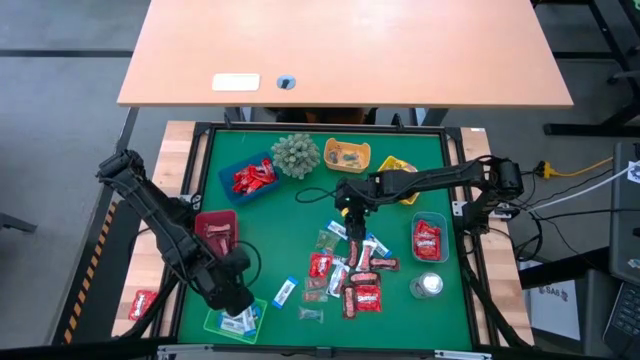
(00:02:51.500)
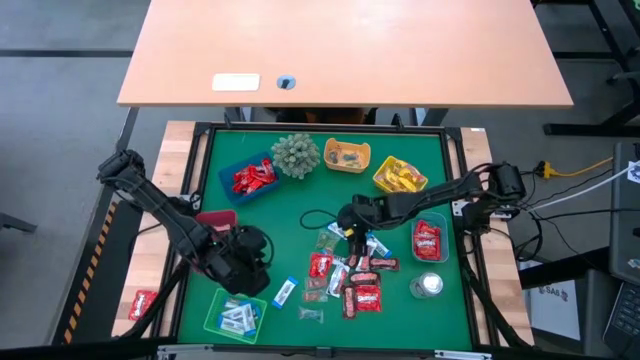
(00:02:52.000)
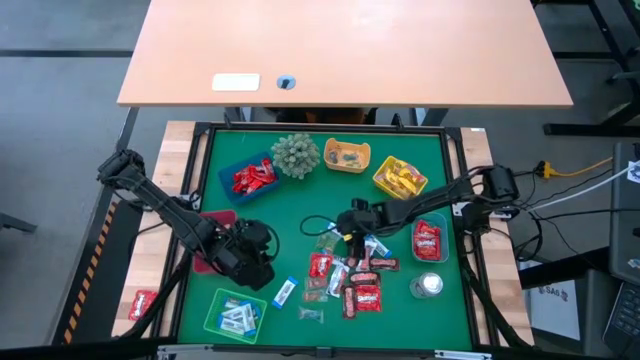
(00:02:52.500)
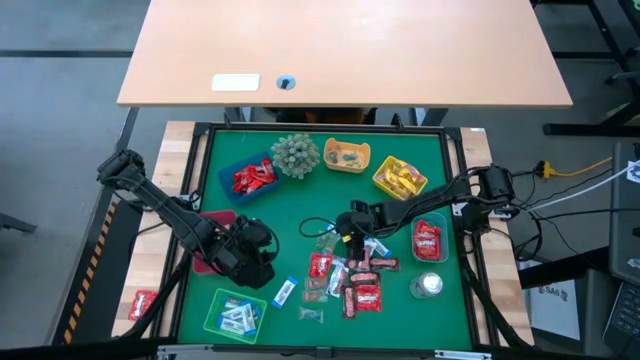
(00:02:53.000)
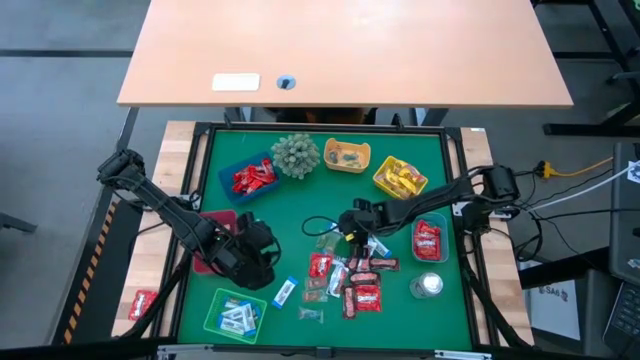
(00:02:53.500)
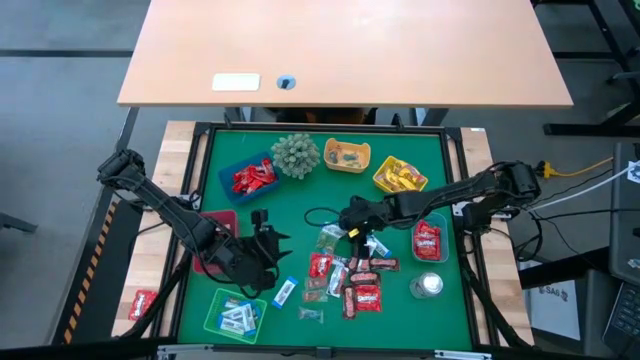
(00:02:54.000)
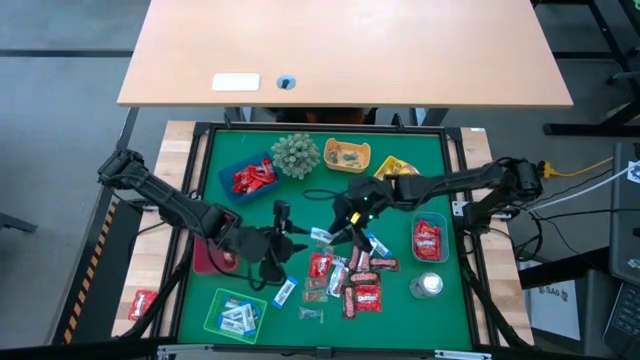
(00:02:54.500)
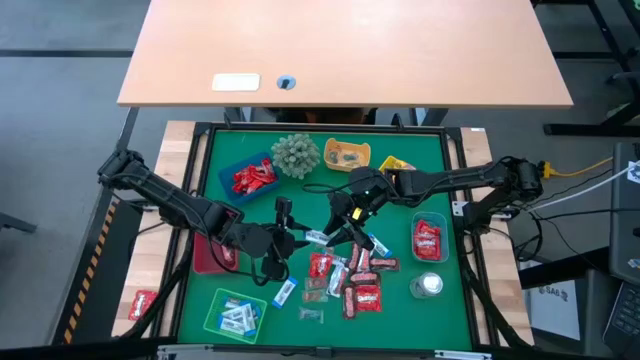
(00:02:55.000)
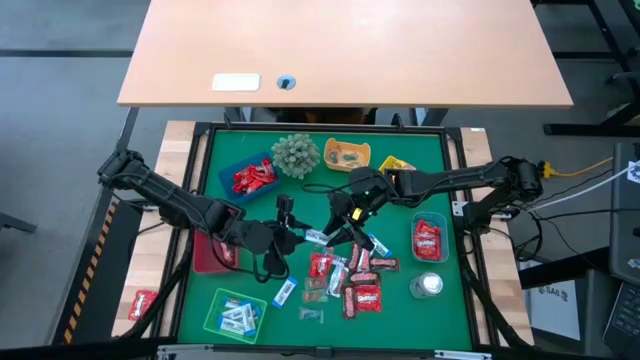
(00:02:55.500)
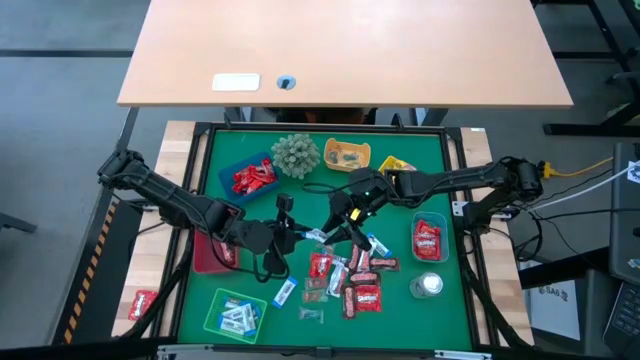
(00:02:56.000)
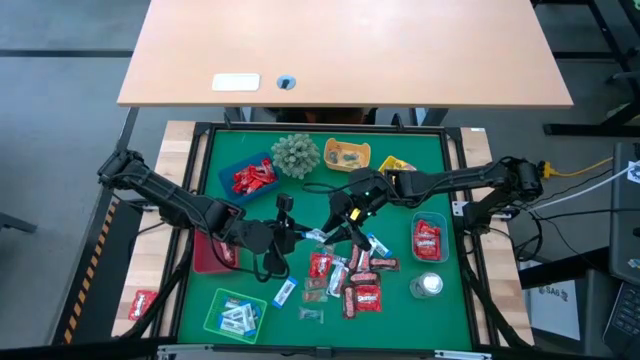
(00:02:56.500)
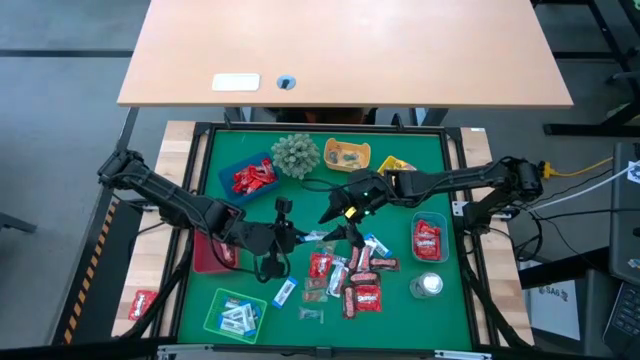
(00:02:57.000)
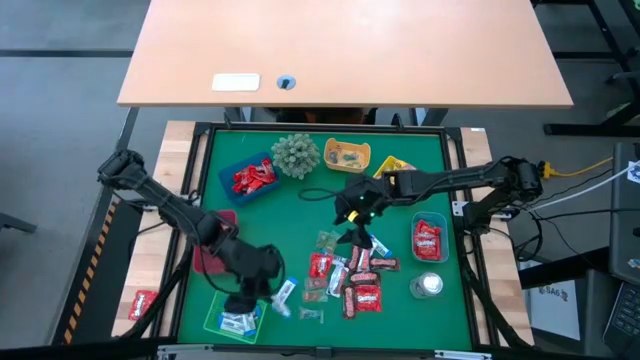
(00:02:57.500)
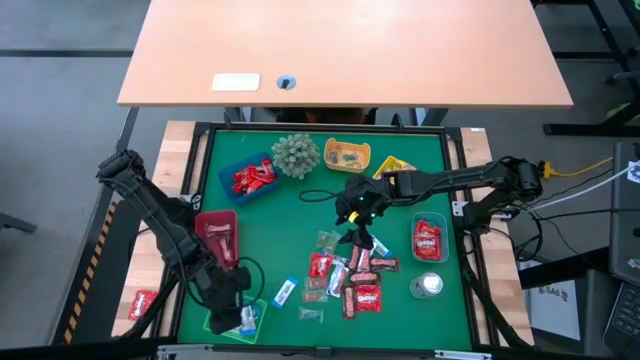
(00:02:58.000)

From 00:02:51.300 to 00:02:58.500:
Task: Sort candy
Put the white-blue chocolate into the green bin

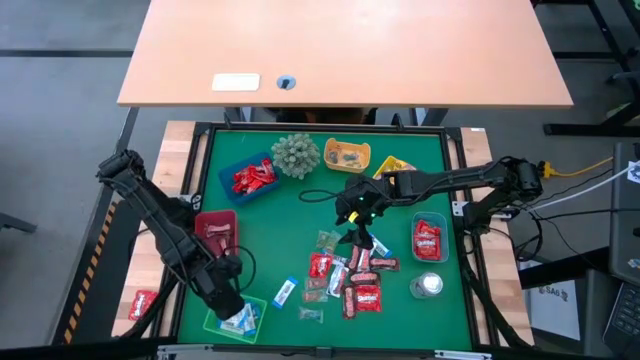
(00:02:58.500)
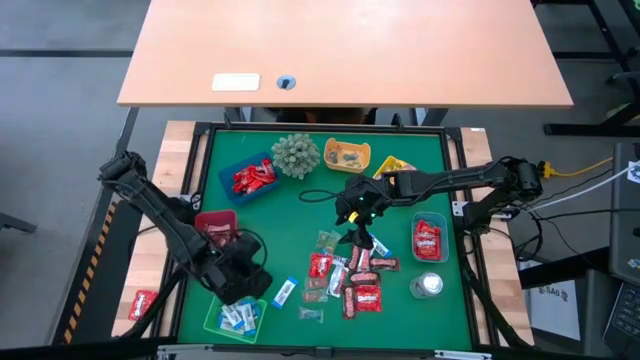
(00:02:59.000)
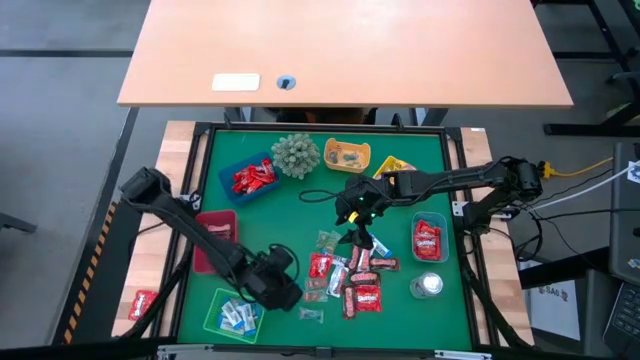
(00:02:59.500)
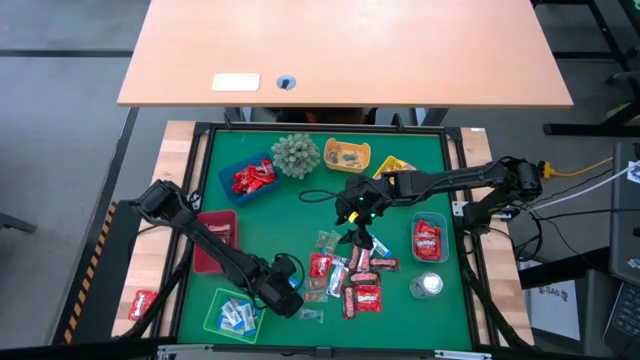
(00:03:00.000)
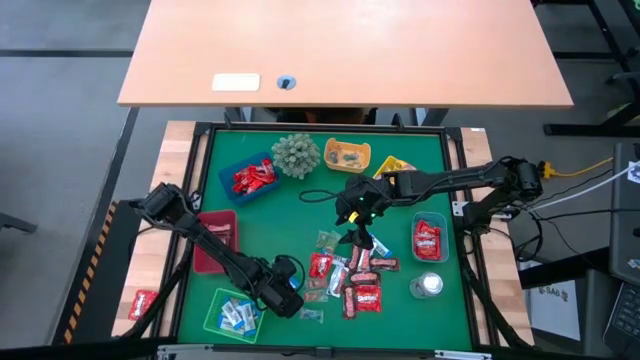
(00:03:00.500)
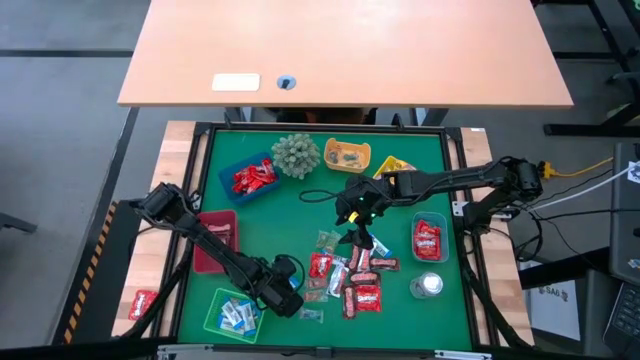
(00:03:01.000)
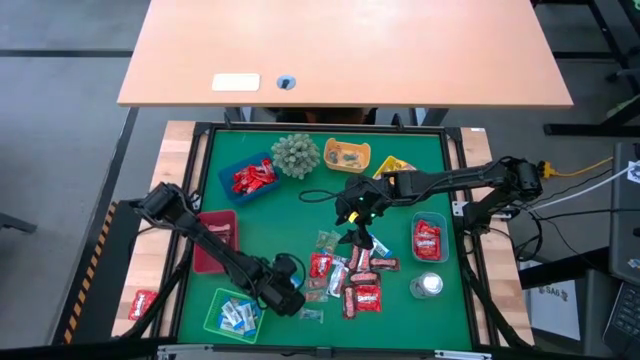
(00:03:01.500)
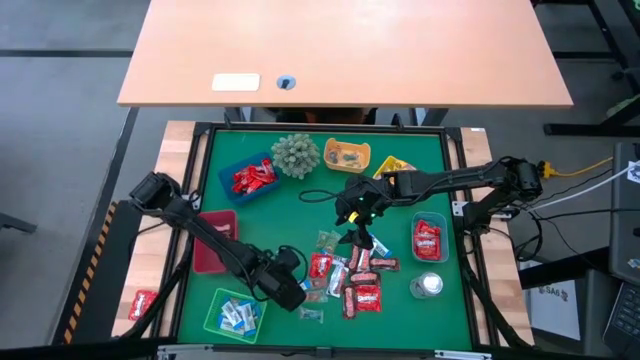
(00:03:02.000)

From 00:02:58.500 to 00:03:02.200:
Put the white-blue chocolate into the green bin

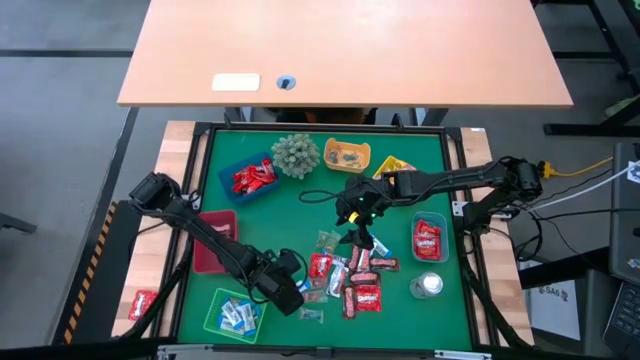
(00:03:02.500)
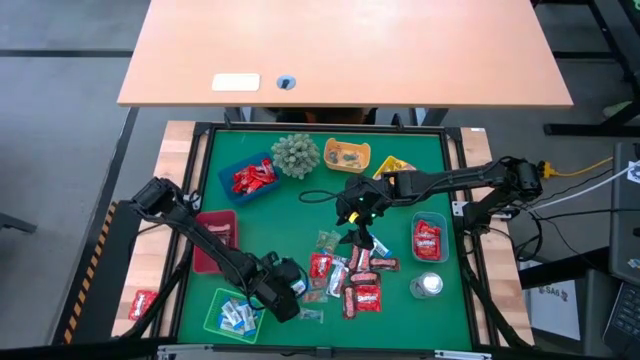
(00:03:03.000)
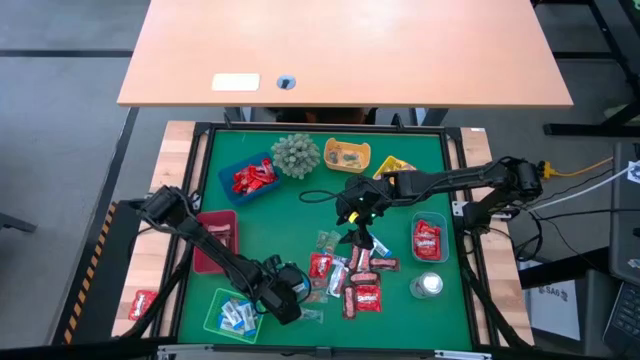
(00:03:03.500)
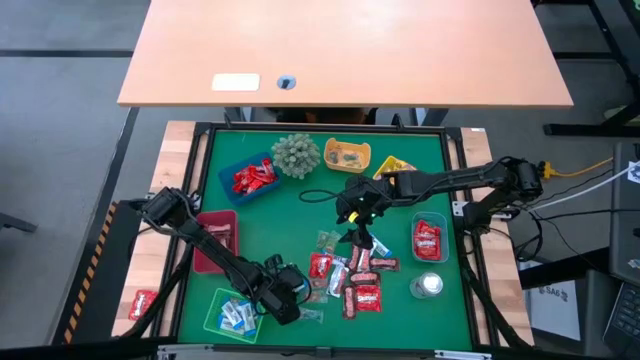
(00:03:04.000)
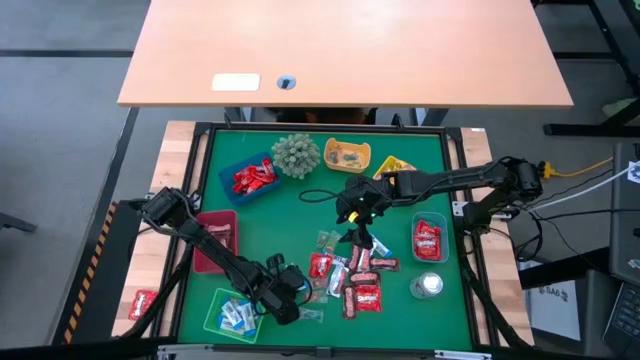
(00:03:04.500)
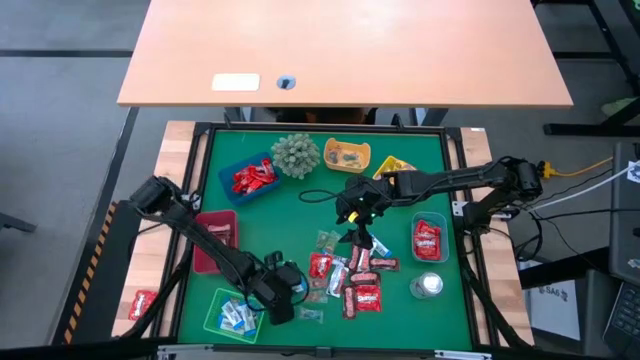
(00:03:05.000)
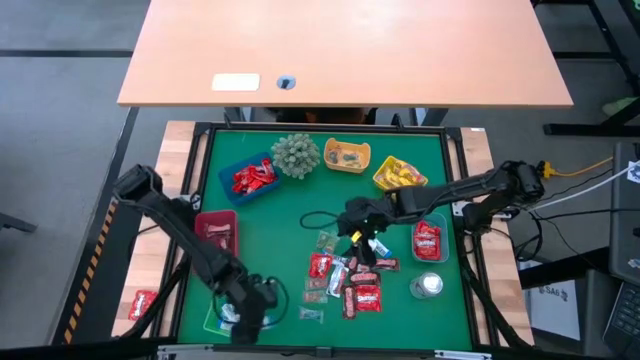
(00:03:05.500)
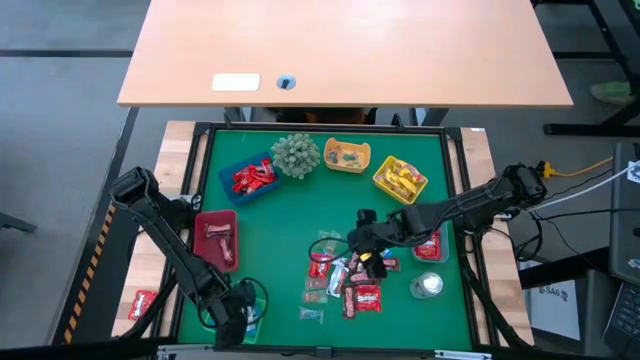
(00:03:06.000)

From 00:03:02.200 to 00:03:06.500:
Put the white-blue chocolate into the green bin

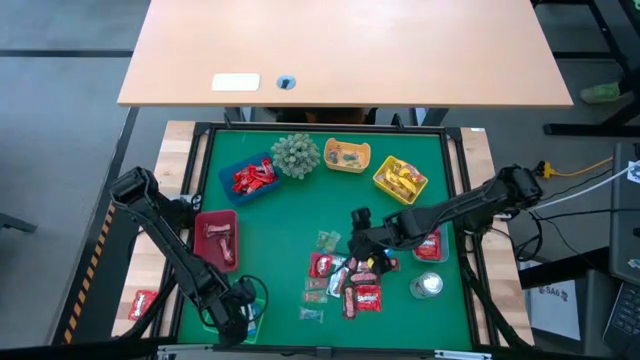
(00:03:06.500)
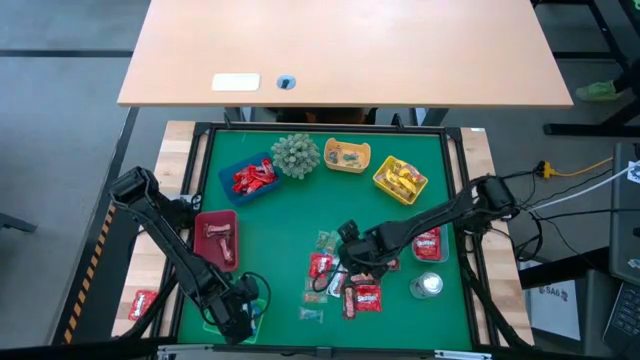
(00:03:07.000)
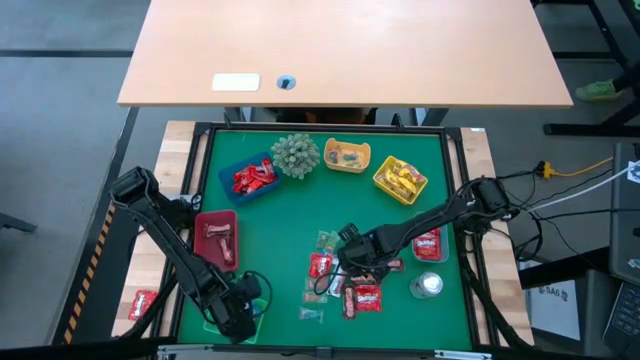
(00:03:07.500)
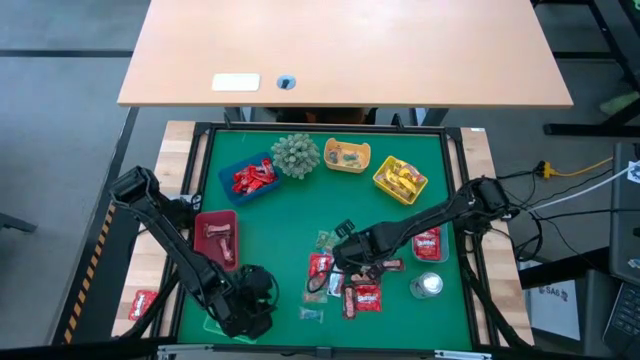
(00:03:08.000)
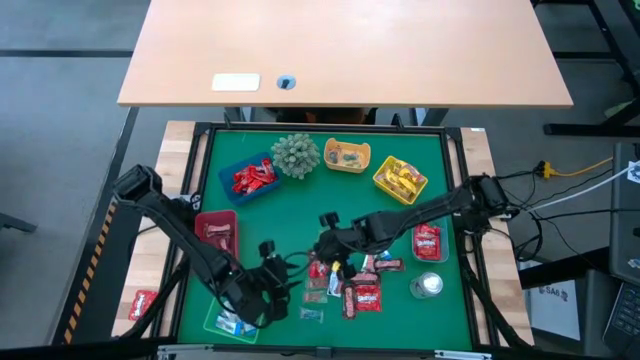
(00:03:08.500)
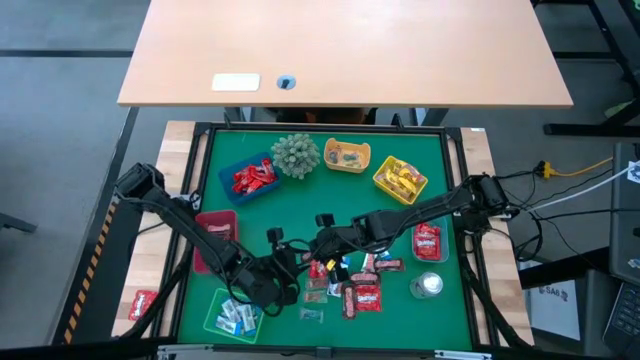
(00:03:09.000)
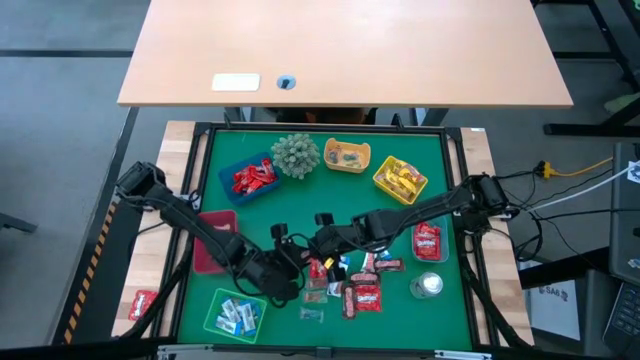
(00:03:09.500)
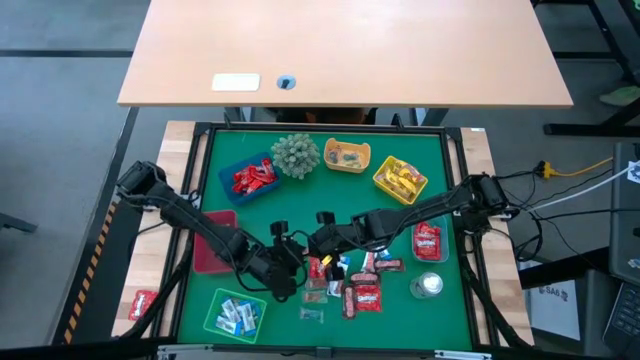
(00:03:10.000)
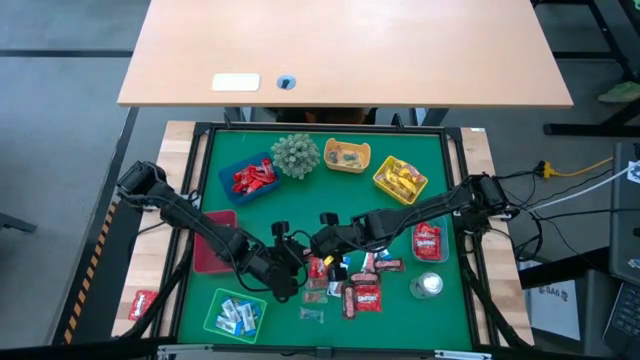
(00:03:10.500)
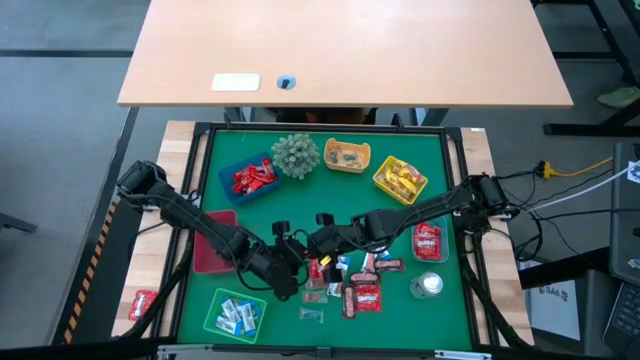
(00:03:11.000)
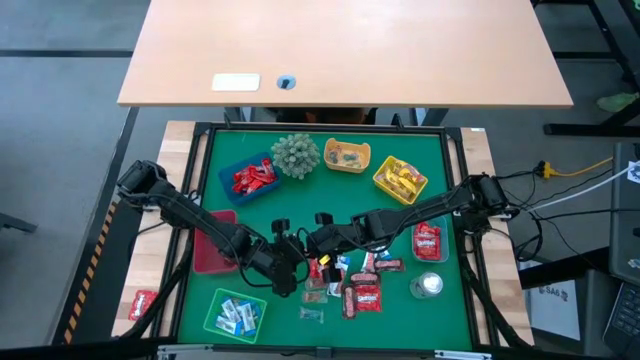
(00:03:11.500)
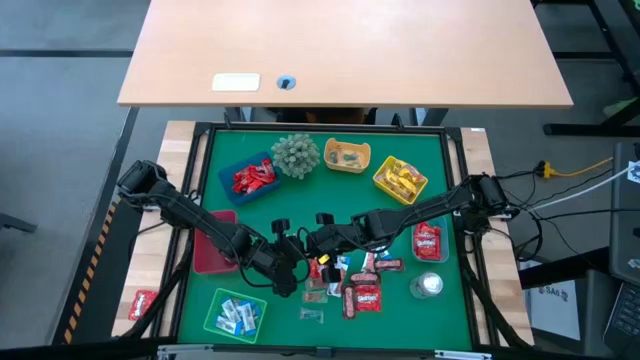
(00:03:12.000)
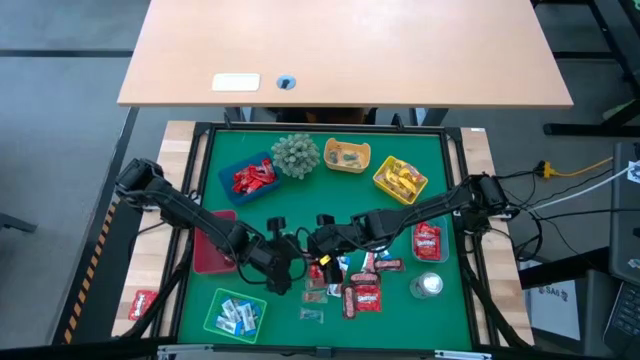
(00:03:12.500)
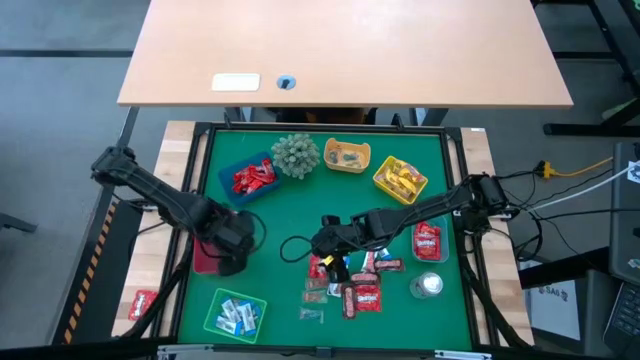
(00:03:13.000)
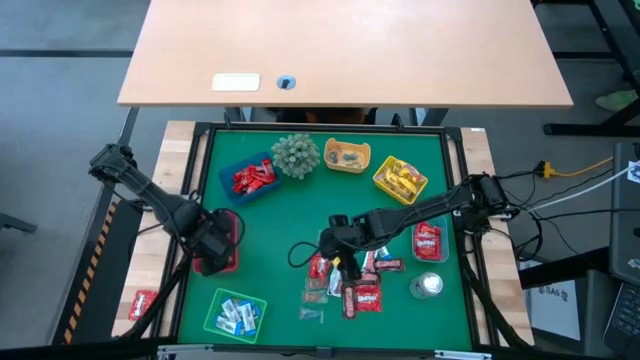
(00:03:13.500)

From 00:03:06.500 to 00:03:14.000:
Put the brown chocolate into the red bin
